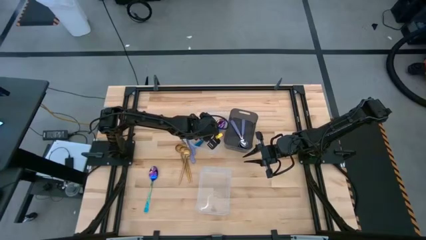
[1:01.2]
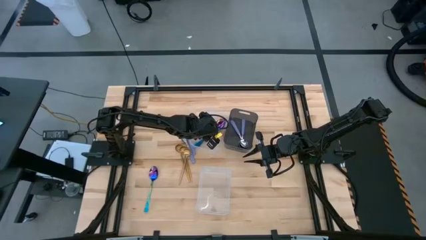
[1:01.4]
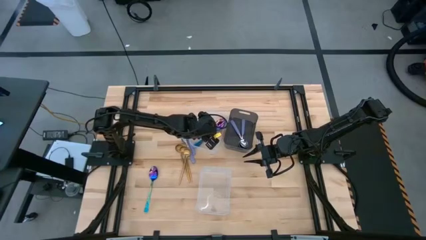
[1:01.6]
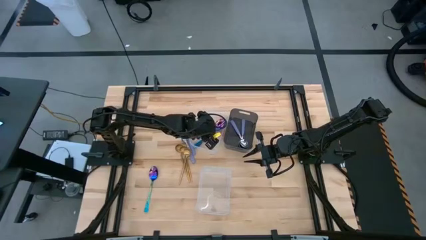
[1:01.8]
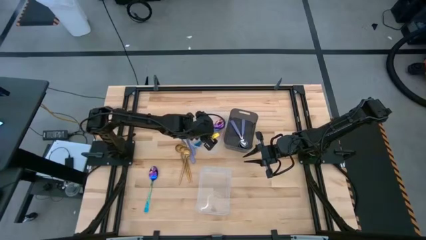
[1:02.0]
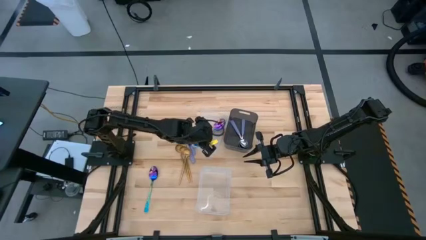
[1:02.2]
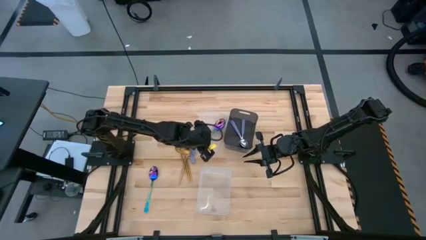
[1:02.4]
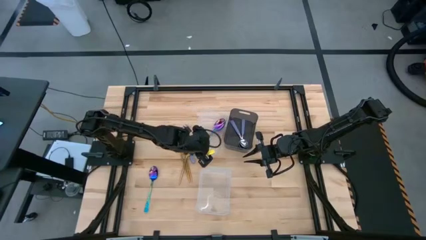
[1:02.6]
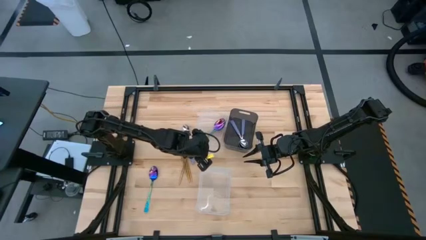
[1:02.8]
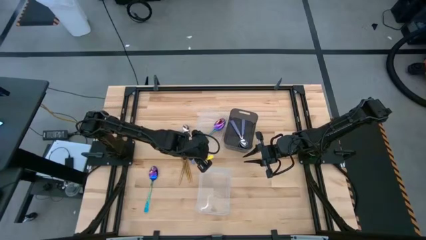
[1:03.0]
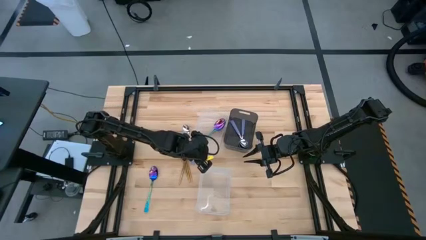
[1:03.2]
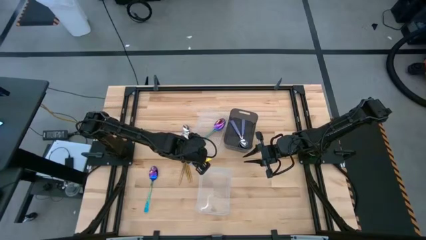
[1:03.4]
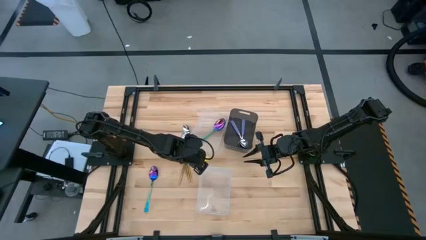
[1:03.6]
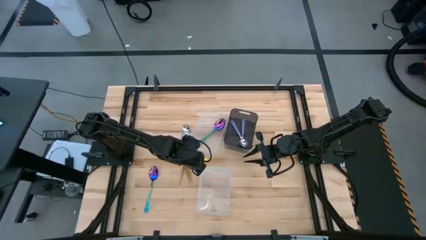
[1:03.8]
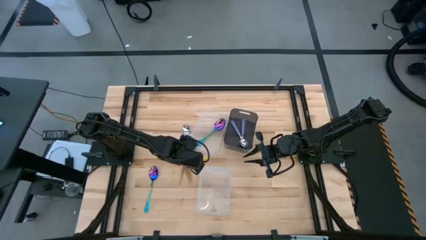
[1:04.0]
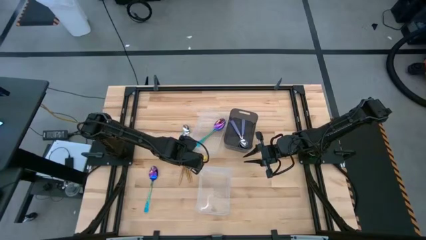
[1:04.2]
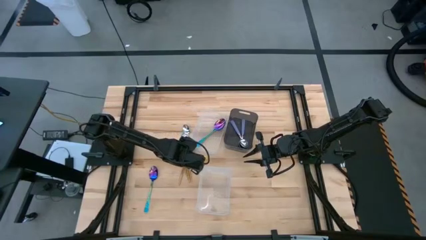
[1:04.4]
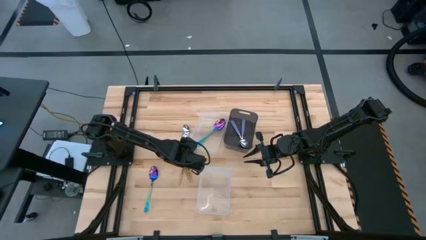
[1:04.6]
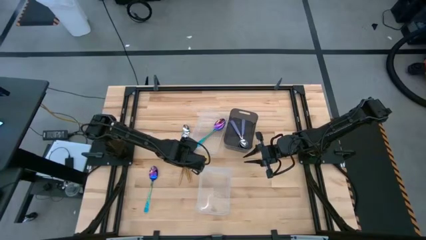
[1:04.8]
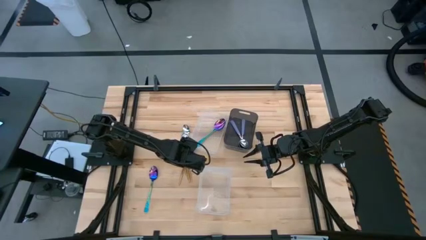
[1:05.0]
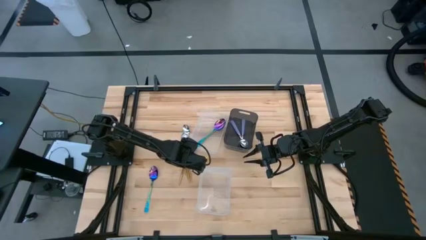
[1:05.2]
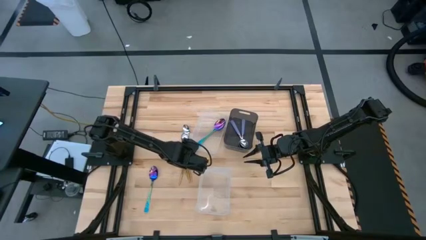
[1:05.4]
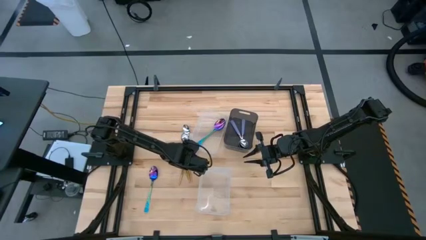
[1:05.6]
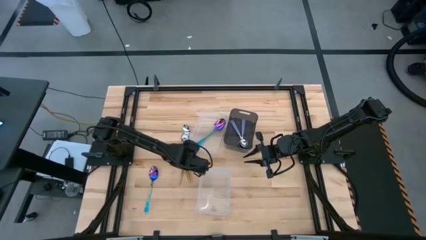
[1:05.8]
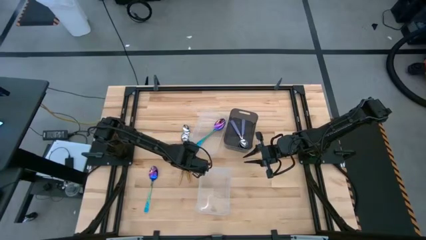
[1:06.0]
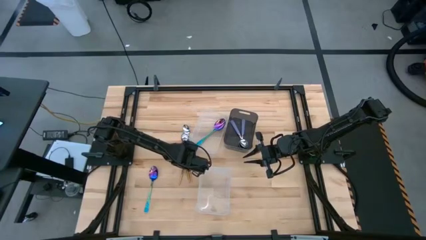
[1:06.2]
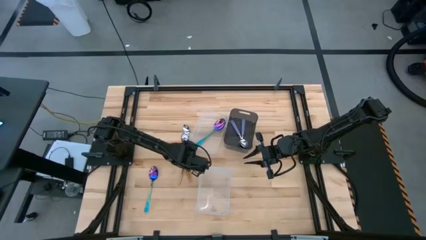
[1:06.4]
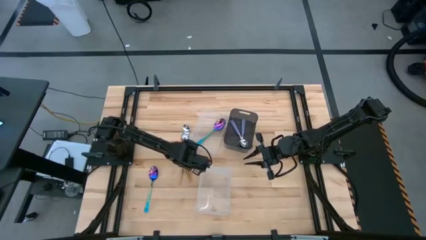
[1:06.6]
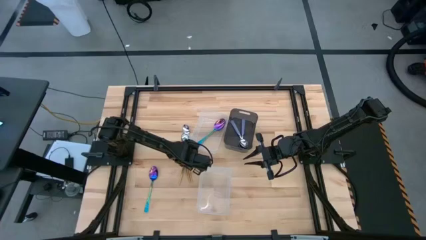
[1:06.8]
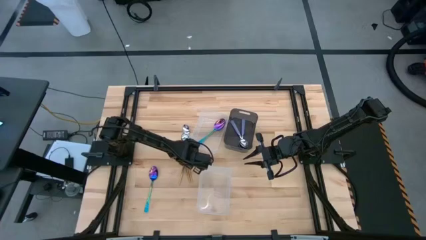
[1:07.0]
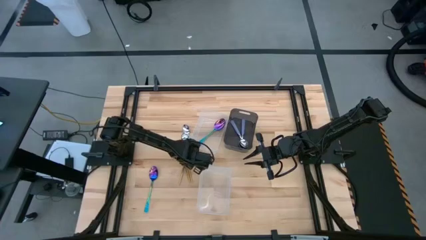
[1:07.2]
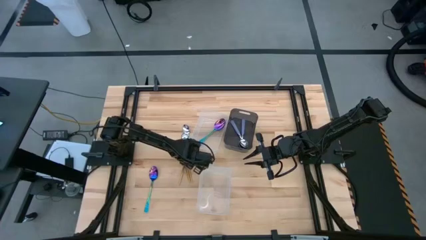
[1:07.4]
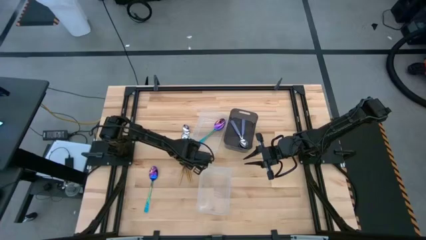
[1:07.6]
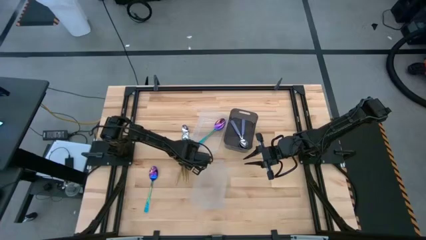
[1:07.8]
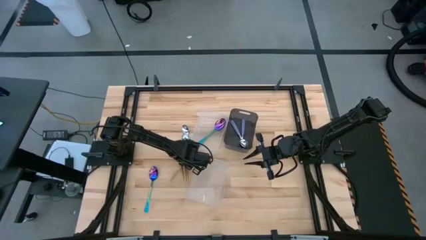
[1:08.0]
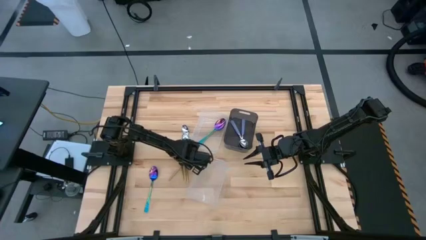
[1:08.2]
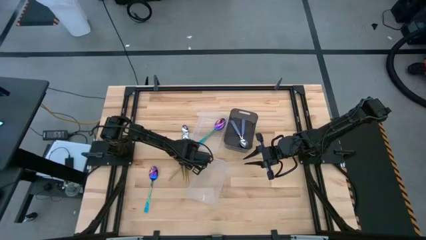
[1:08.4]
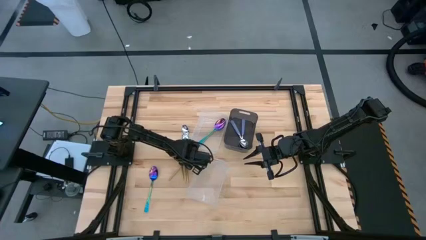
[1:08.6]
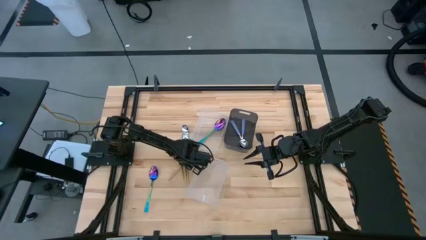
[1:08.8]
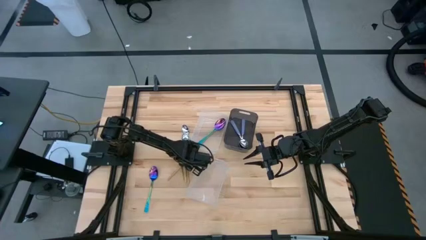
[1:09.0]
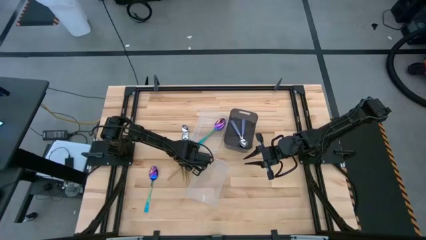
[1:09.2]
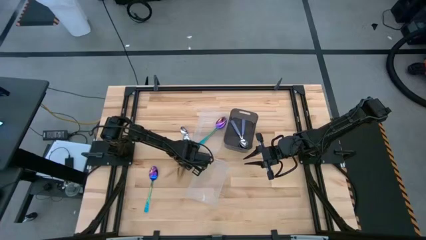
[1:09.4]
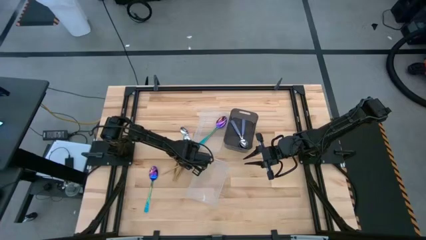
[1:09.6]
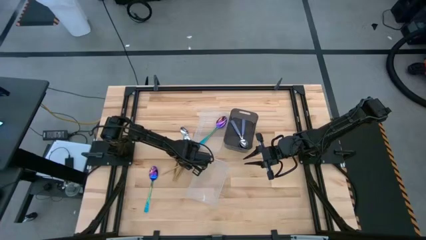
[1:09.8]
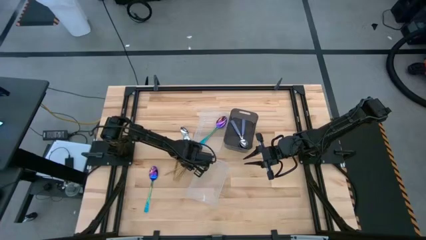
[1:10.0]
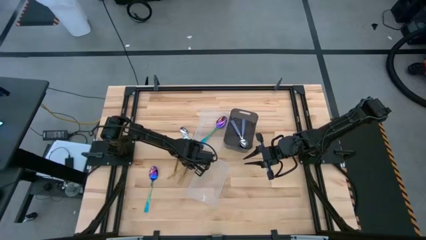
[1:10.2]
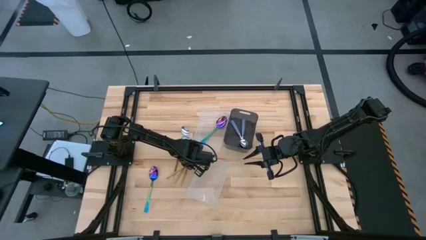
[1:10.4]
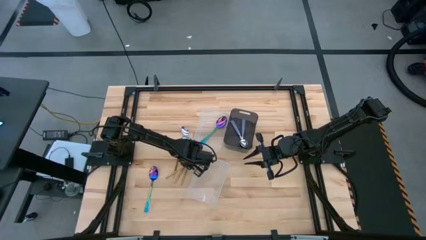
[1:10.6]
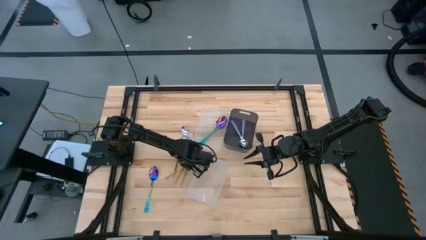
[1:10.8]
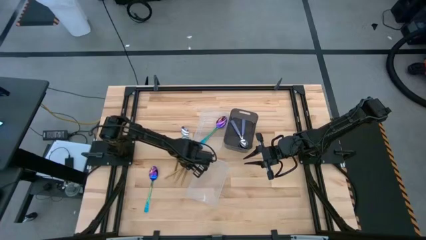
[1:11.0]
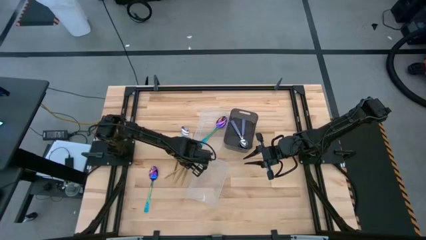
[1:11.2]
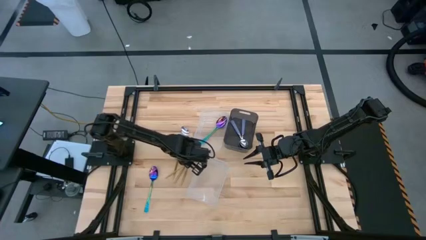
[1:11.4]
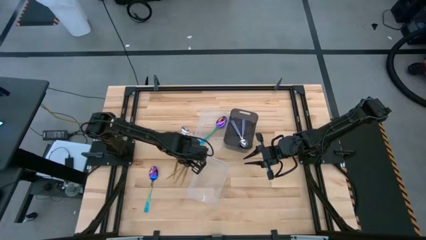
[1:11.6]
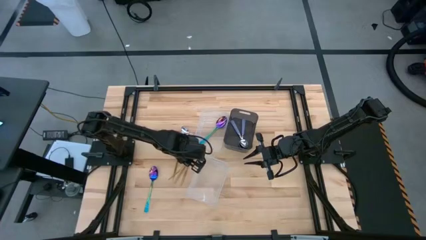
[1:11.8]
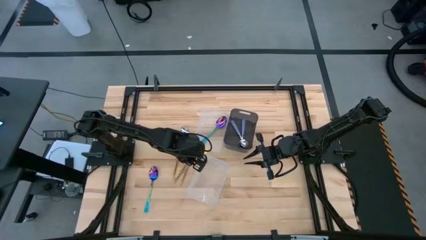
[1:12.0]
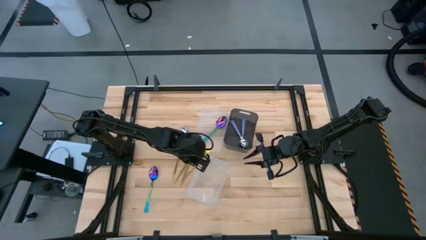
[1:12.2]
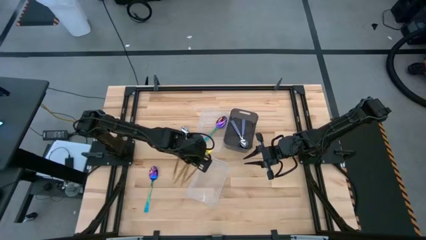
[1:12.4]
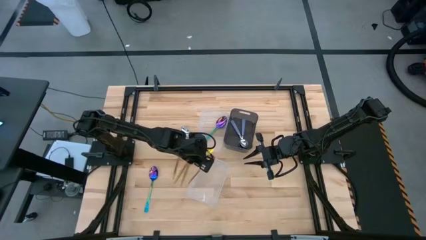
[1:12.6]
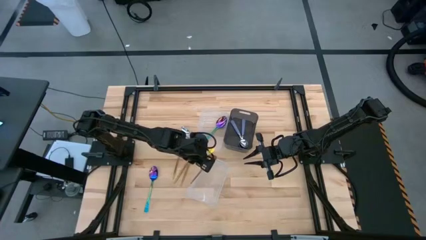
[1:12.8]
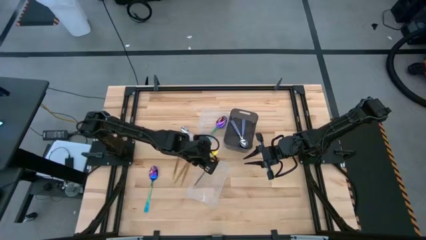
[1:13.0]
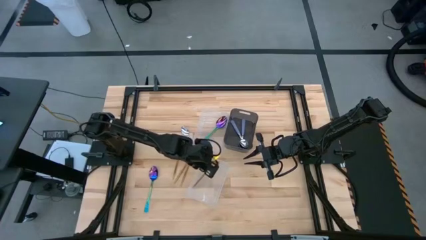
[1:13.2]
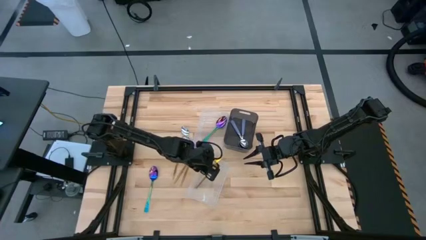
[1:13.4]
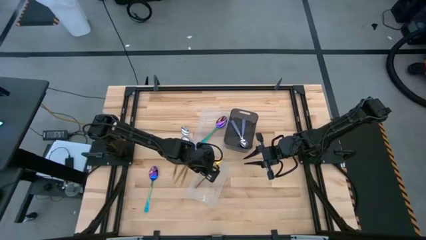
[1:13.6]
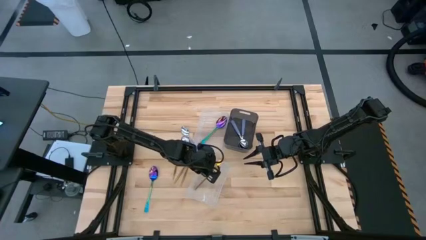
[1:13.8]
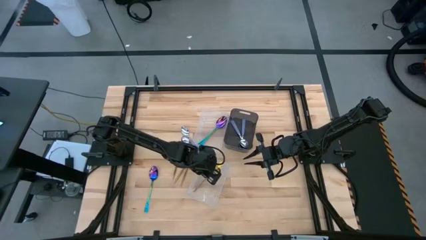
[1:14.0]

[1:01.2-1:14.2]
Task: Sort silverware by color (type)
Put the gold spoon into the bottom transparent bin

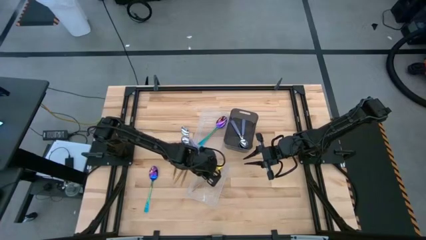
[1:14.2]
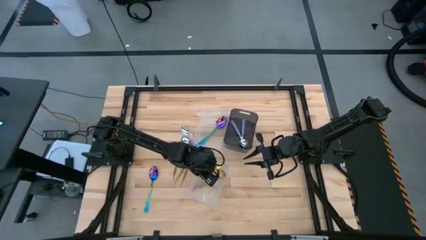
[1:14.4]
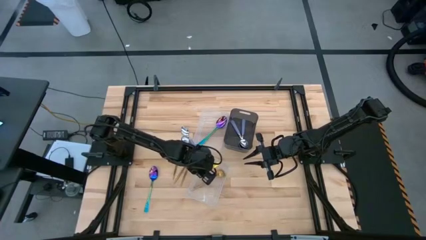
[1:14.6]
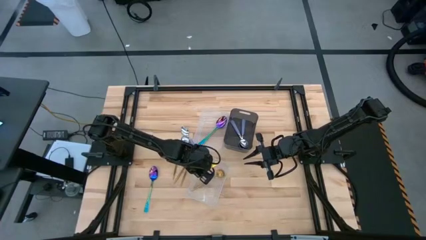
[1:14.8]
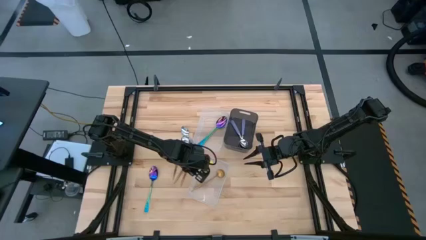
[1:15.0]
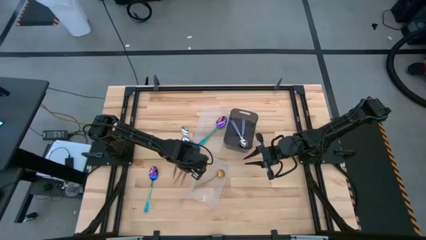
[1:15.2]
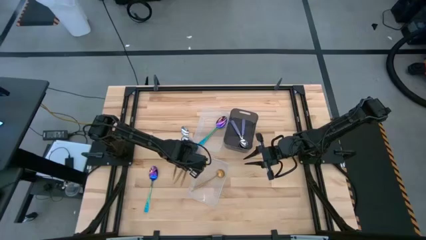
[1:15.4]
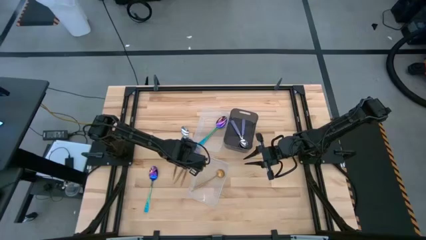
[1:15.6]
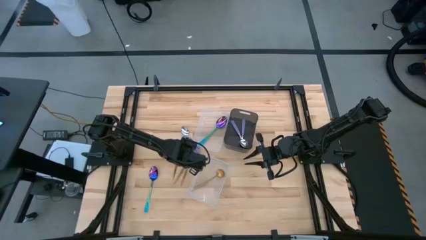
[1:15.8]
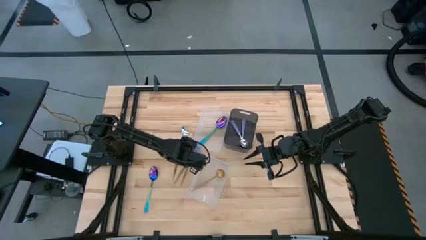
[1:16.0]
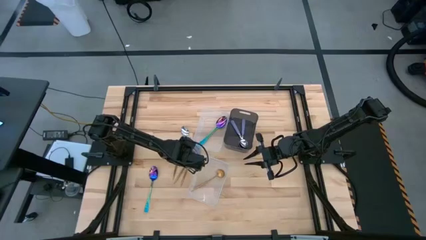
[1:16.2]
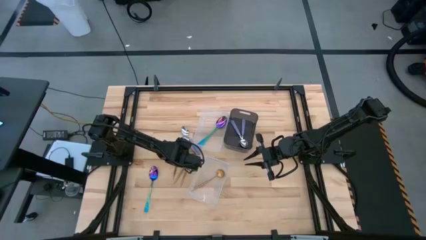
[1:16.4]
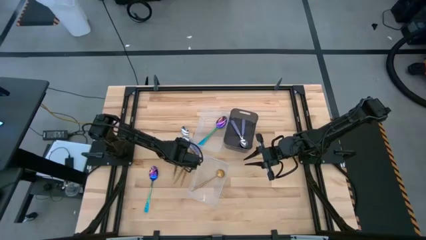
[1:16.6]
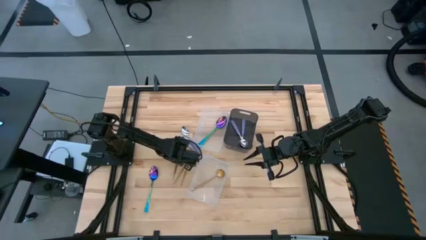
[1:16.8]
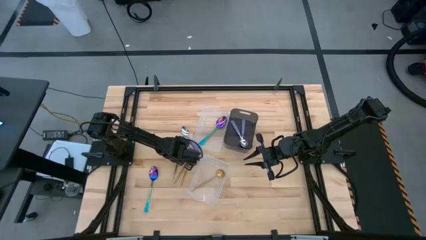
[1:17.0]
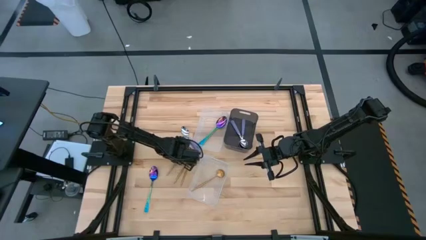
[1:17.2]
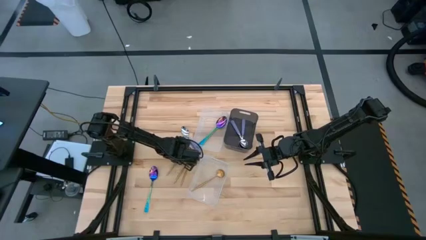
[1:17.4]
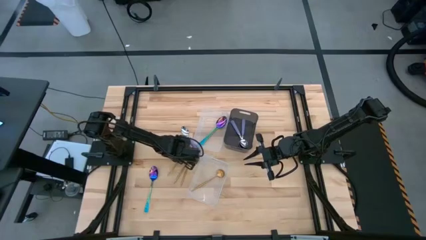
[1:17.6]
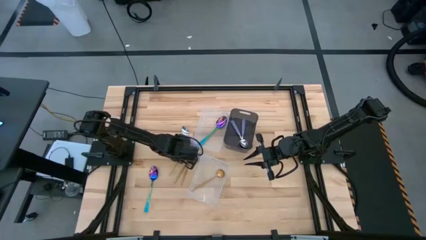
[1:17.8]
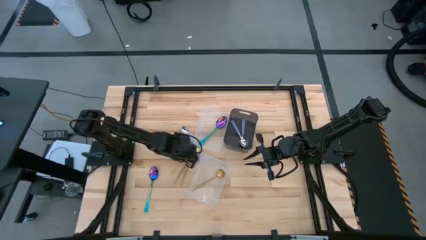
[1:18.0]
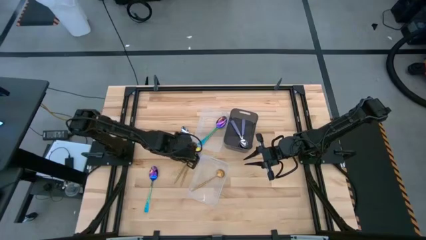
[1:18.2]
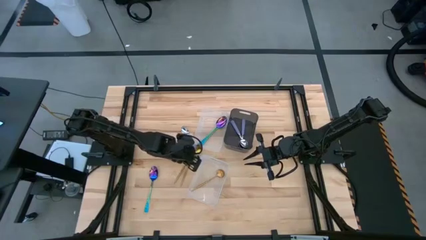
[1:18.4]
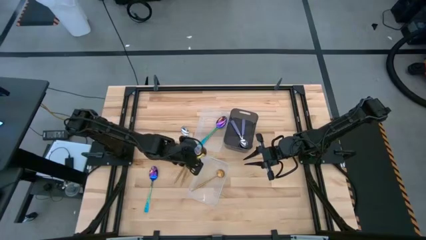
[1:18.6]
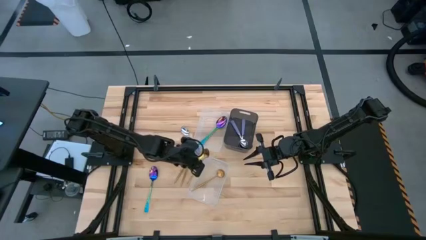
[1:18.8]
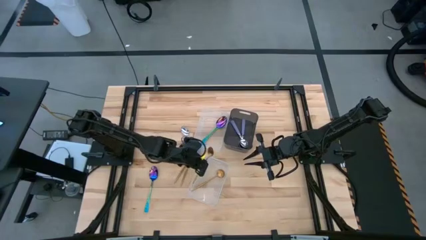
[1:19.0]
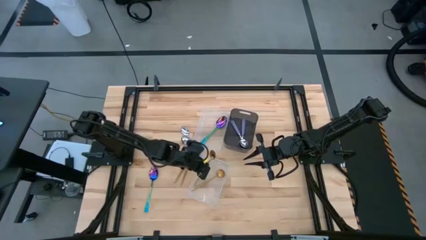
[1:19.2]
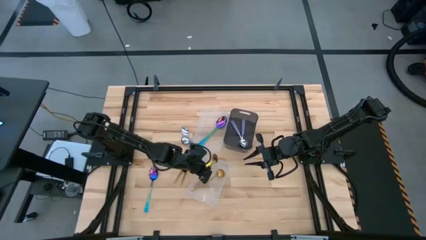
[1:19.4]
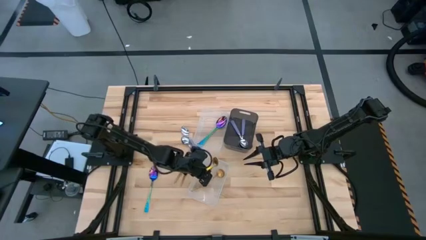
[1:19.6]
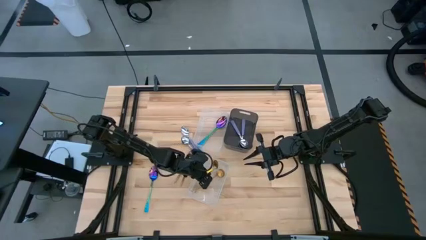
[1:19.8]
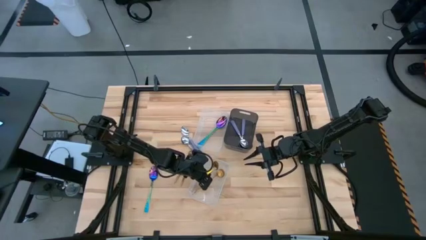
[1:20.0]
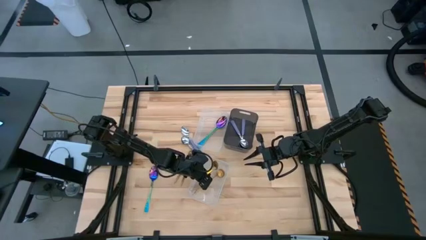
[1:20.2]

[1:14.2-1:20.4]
Put the gold spoon into the bottom transparent bin
